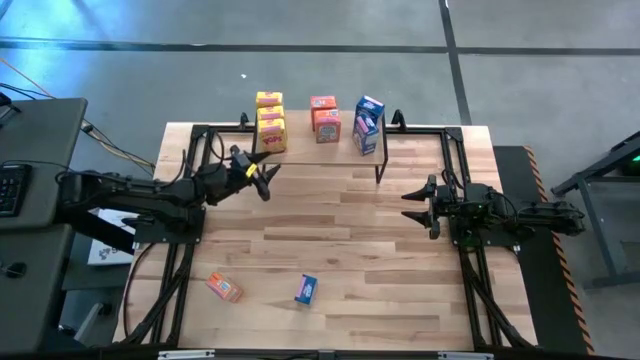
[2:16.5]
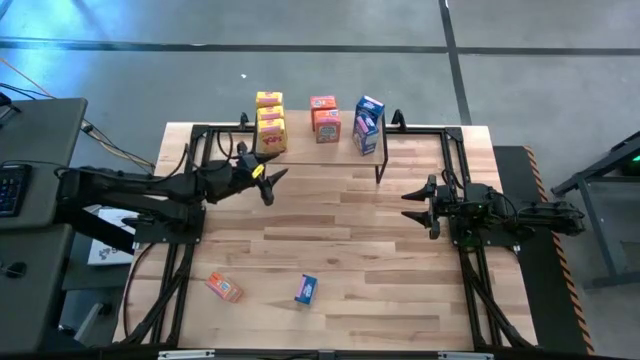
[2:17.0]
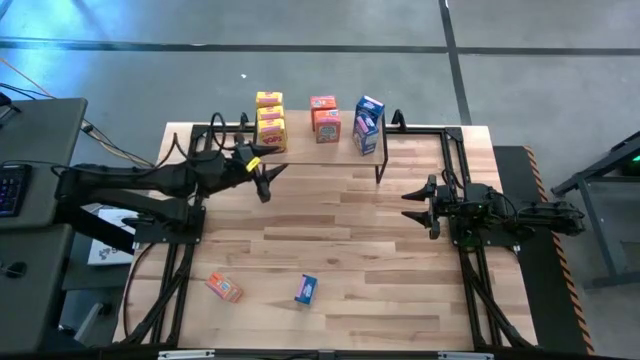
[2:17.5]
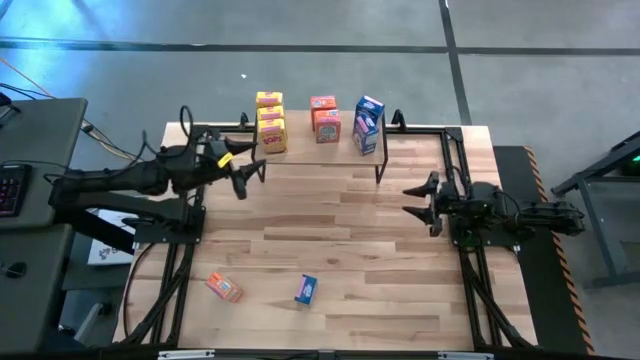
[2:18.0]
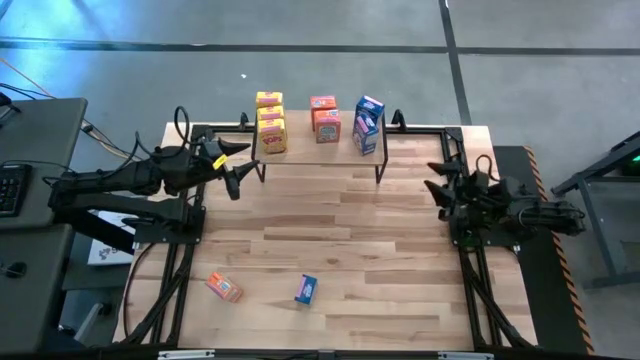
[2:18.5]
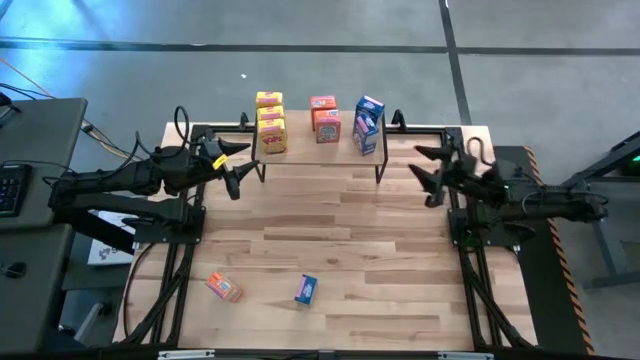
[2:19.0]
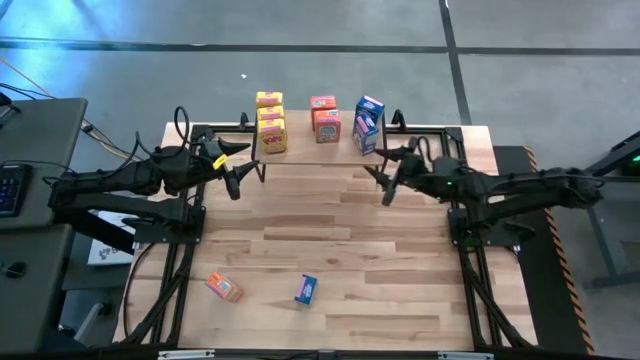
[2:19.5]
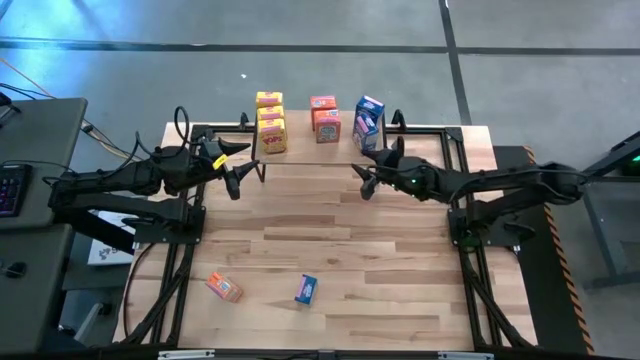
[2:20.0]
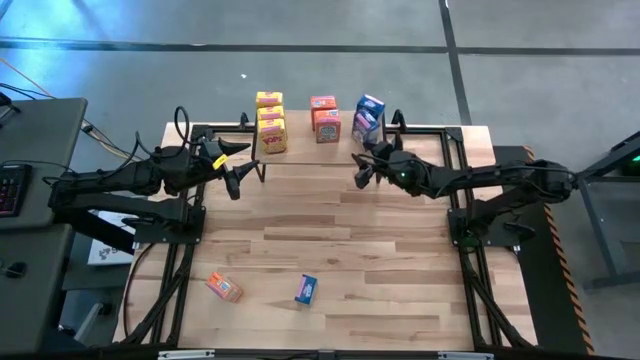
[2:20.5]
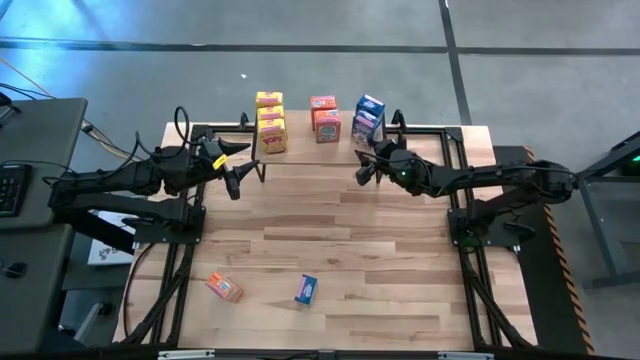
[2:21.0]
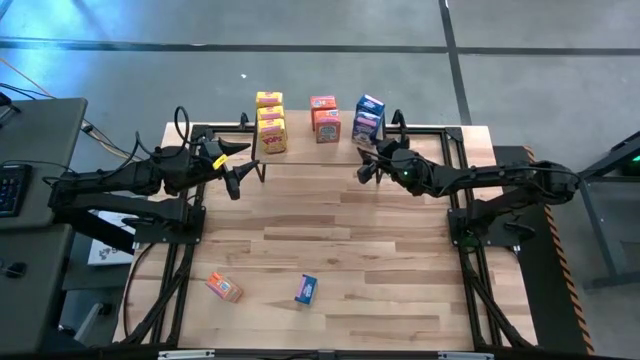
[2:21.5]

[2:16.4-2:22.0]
Task: Stack cereal on shelf
Adjust the blue cereal box on the shelf

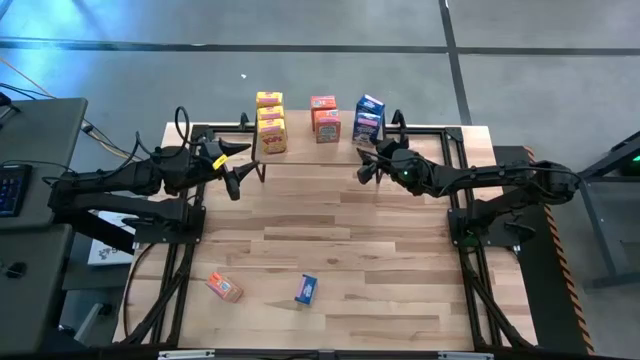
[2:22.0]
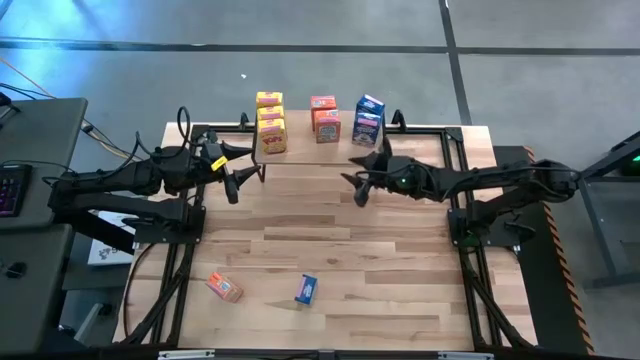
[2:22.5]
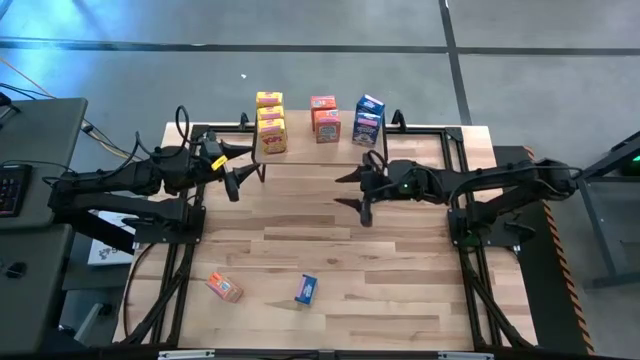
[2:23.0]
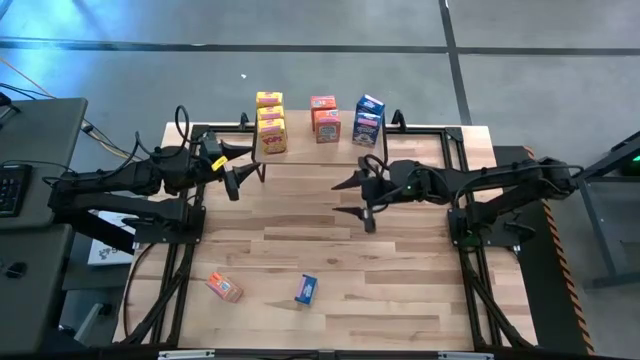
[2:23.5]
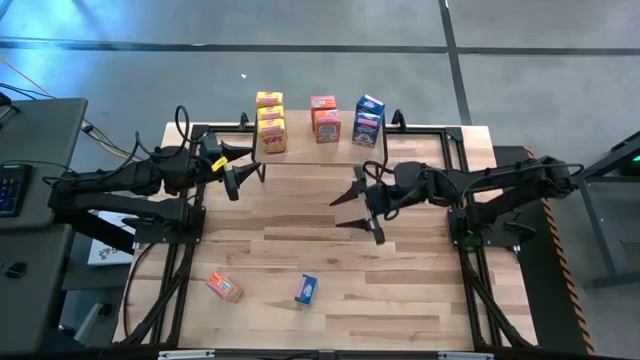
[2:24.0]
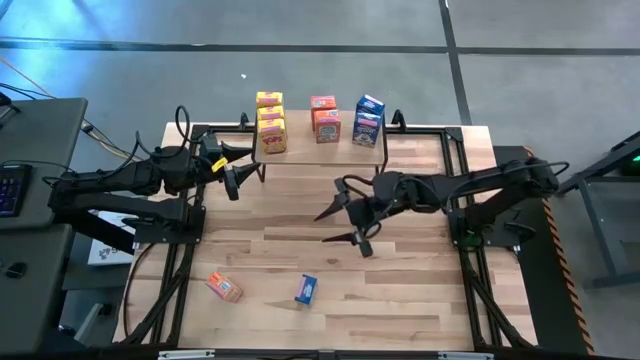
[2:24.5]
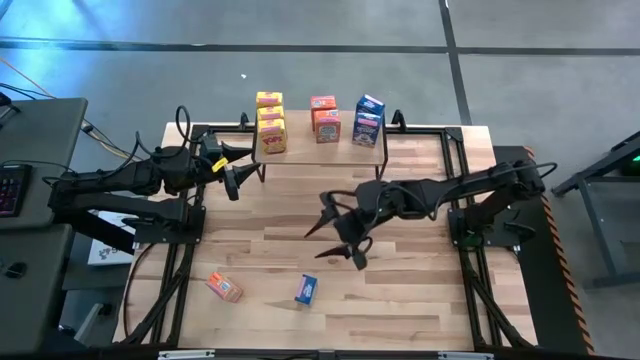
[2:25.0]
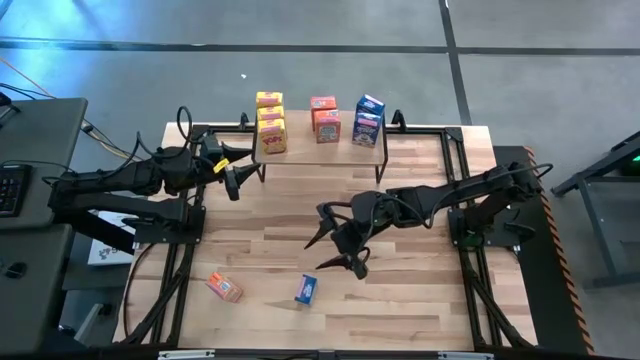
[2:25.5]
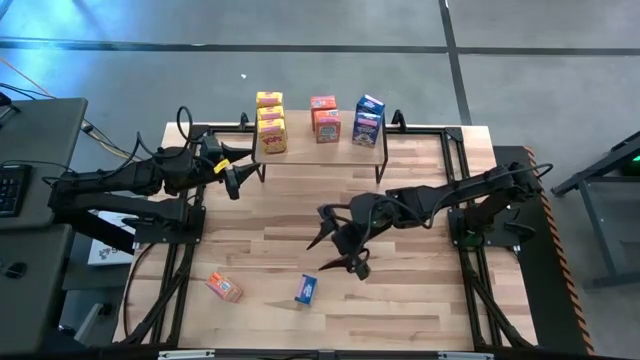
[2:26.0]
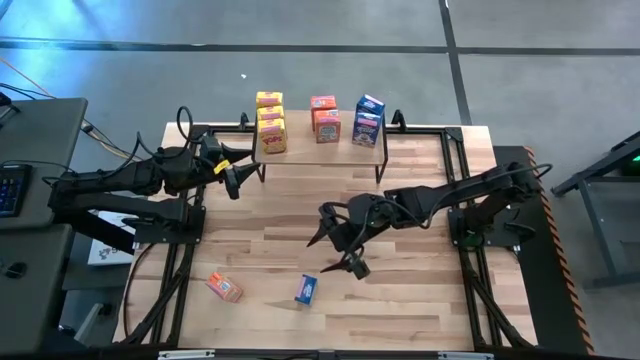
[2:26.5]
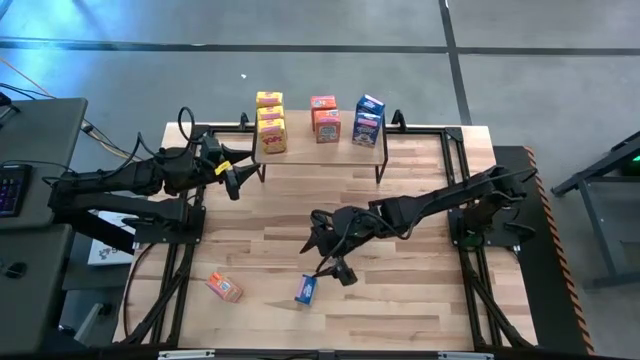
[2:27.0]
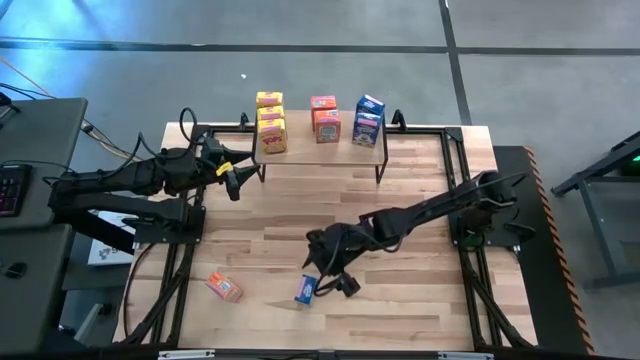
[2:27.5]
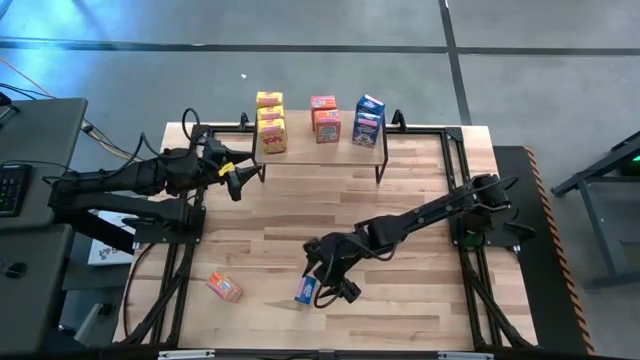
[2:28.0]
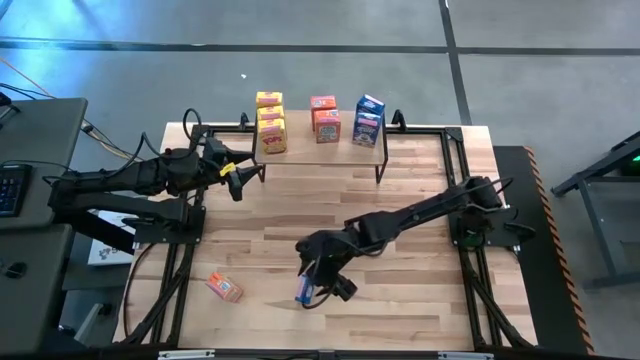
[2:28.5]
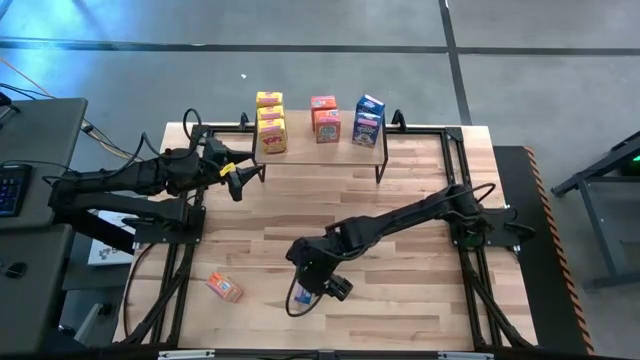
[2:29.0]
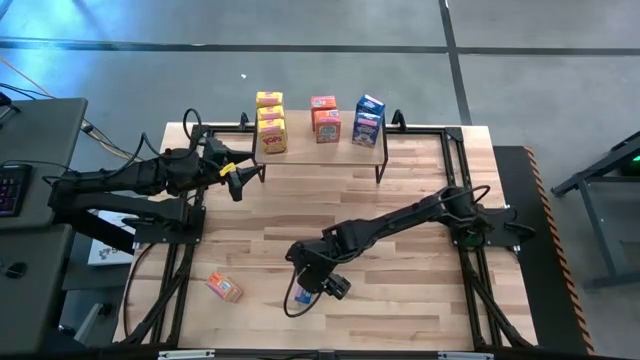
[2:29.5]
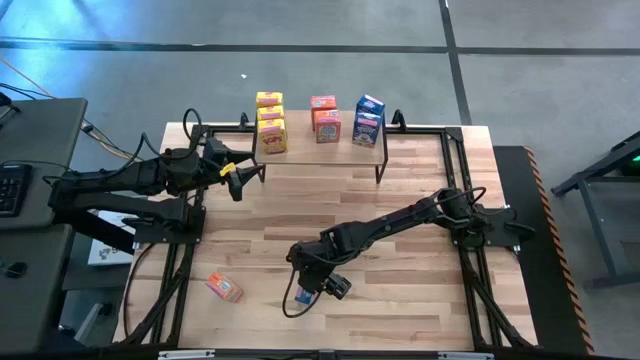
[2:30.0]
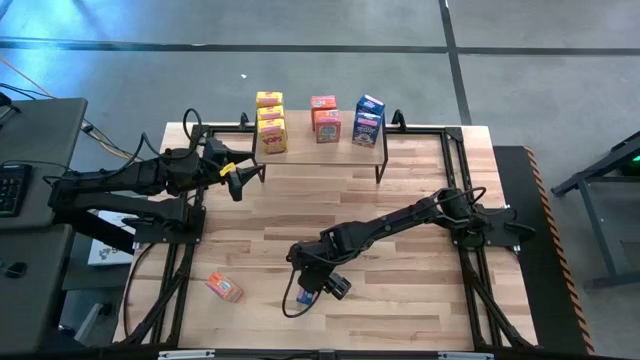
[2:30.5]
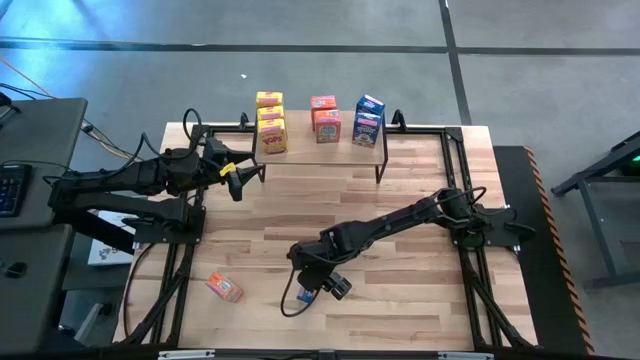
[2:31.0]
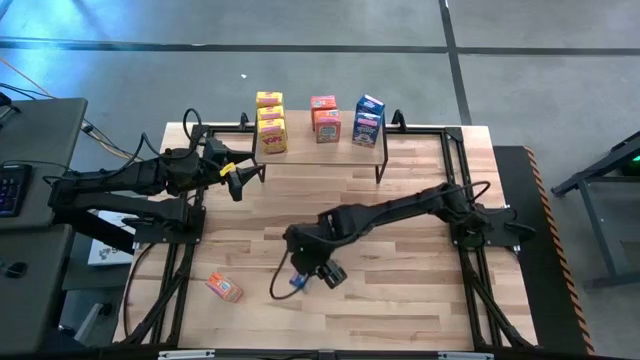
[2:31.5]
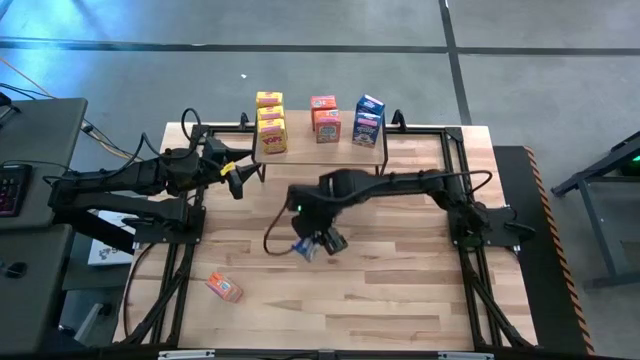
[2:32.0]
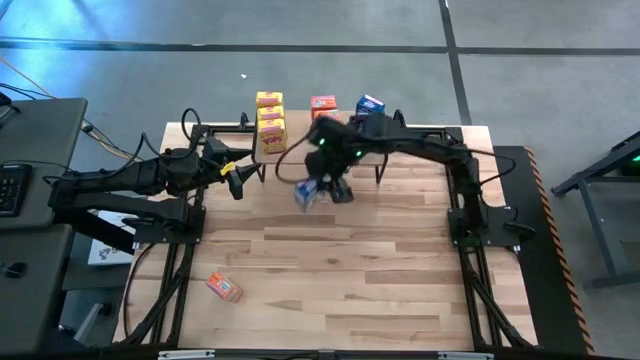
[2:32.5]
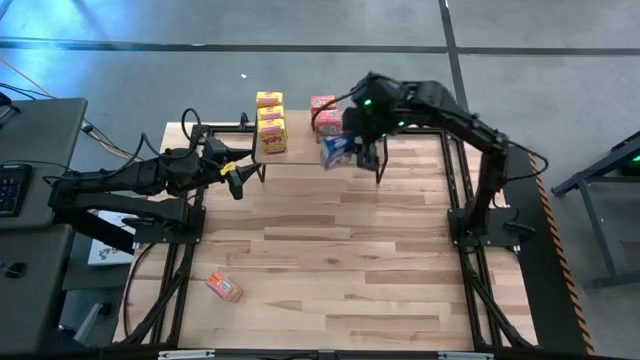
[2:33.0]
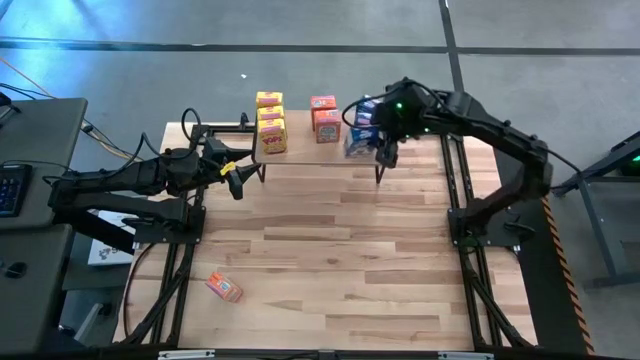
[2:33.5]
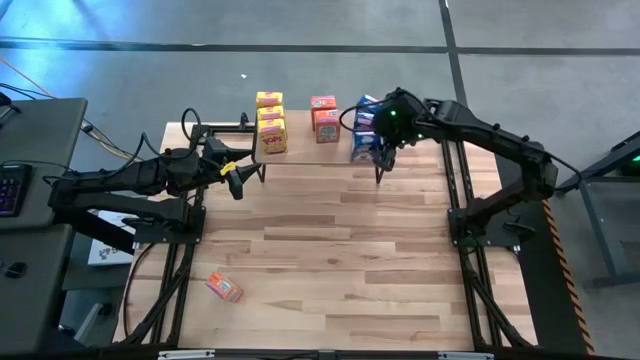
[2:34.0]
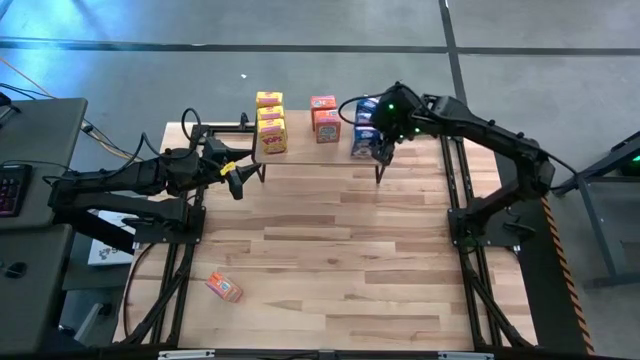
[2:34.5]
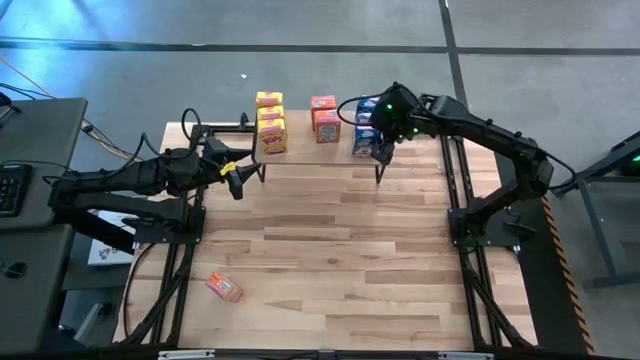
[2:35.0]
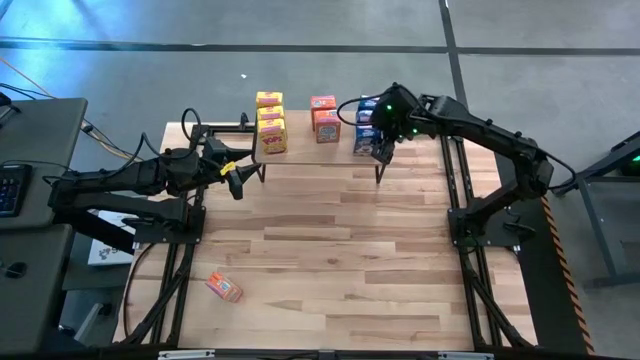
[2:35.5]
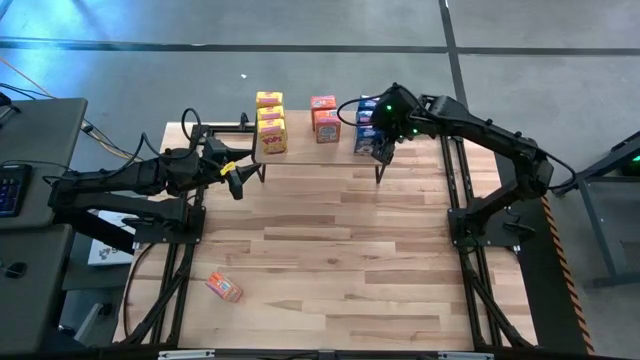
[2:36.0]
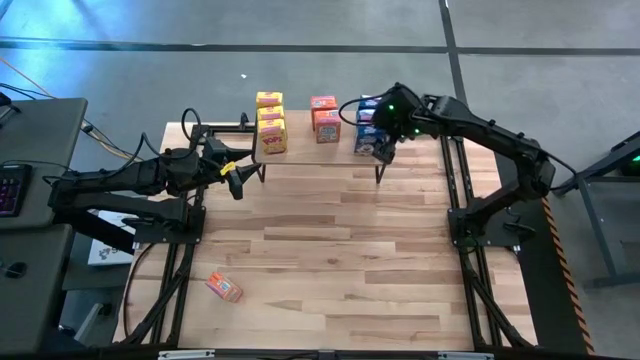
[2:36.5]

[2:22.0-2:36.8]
Put the blue cereal box aligned with the other blue cereal box on the shelf
